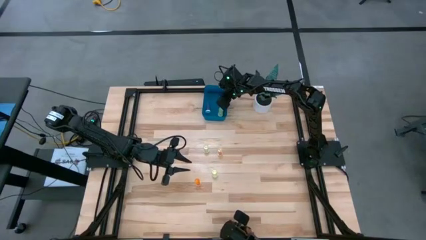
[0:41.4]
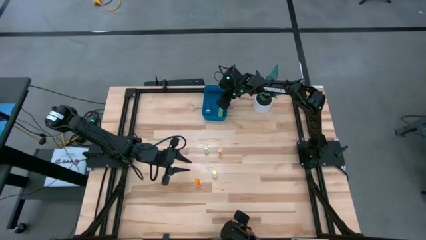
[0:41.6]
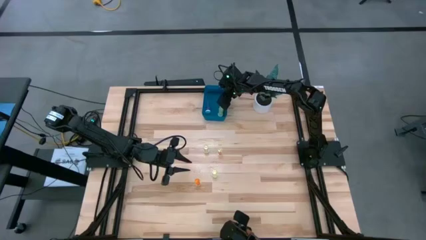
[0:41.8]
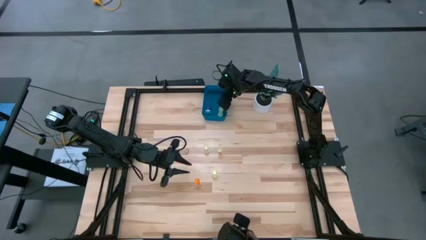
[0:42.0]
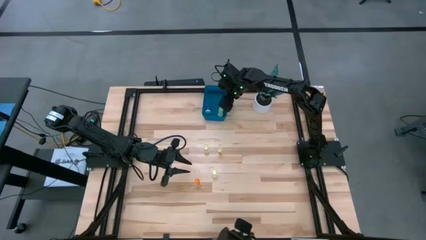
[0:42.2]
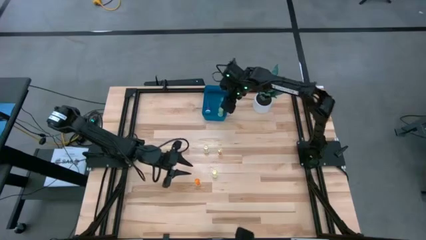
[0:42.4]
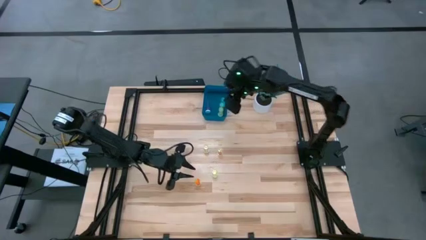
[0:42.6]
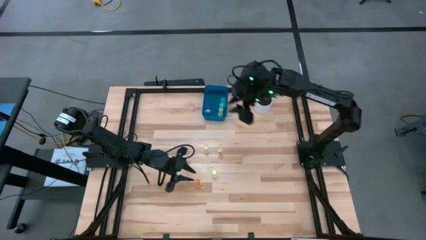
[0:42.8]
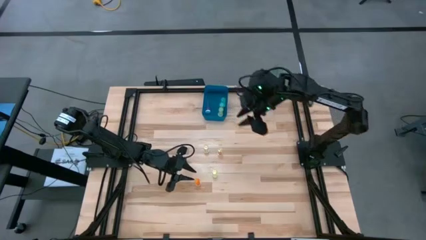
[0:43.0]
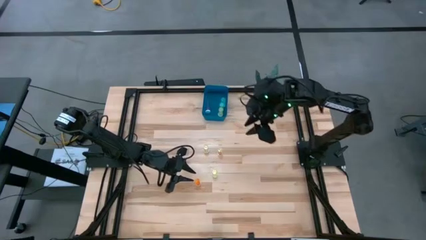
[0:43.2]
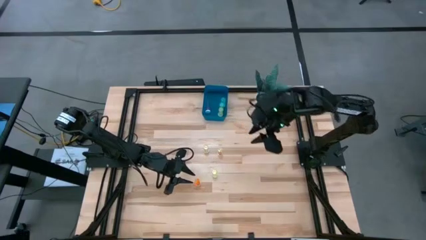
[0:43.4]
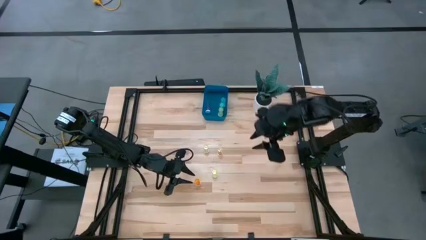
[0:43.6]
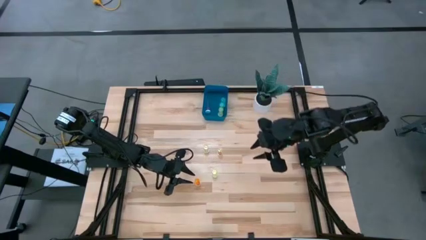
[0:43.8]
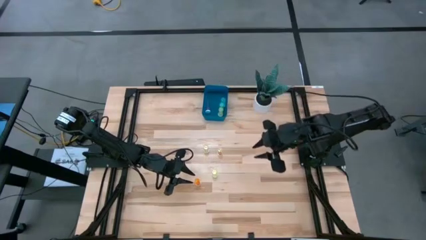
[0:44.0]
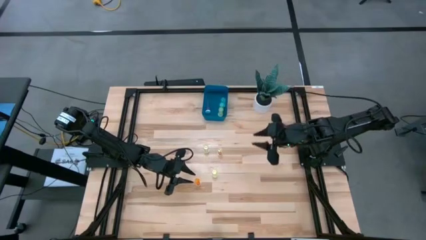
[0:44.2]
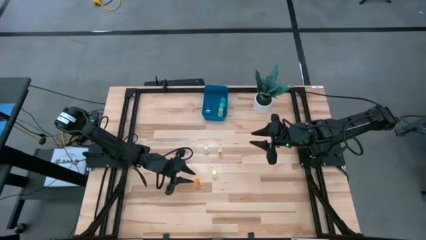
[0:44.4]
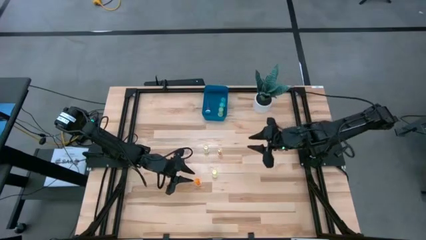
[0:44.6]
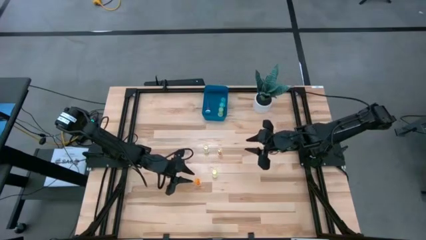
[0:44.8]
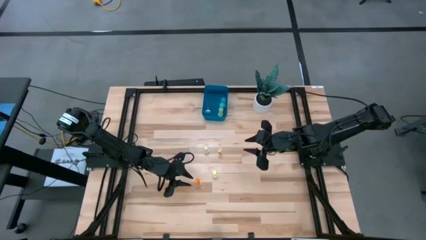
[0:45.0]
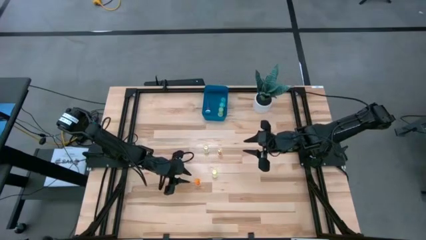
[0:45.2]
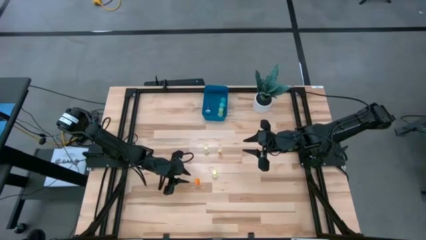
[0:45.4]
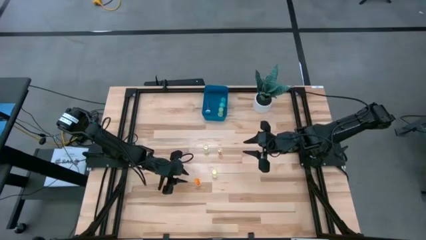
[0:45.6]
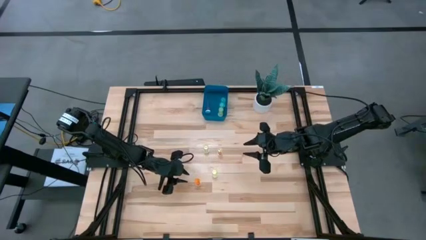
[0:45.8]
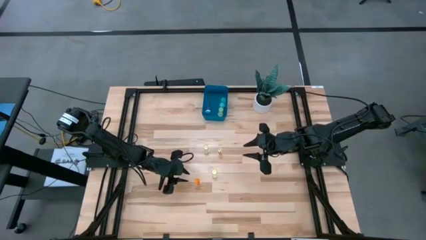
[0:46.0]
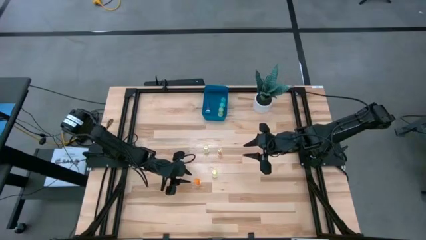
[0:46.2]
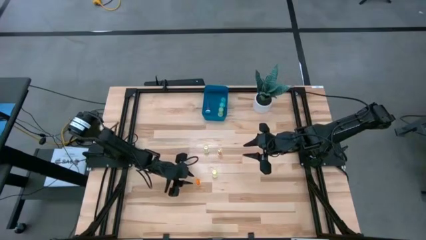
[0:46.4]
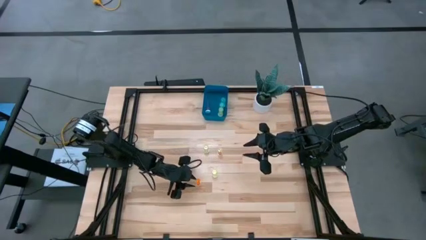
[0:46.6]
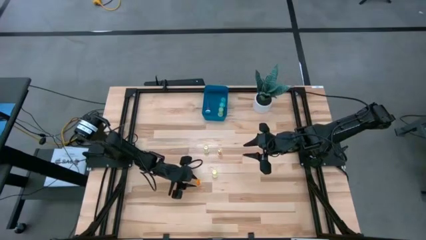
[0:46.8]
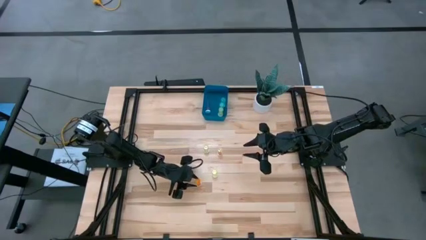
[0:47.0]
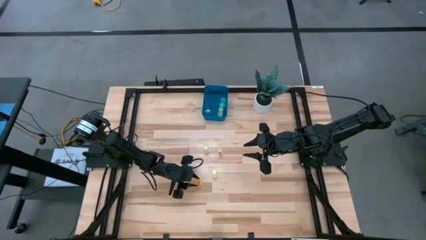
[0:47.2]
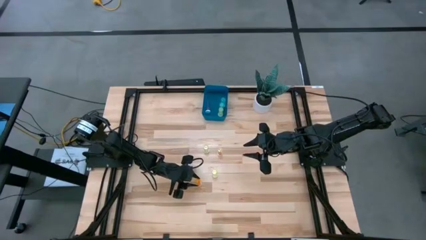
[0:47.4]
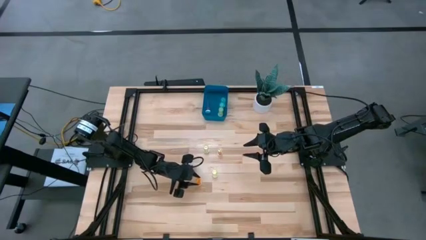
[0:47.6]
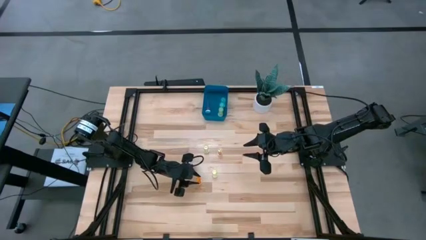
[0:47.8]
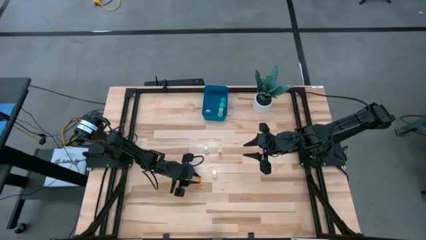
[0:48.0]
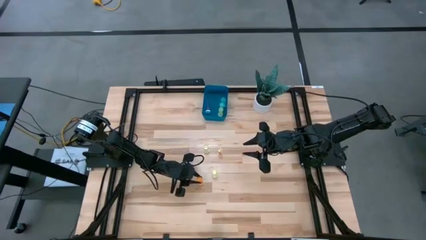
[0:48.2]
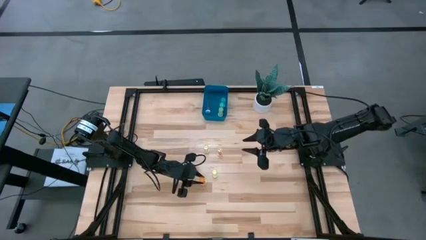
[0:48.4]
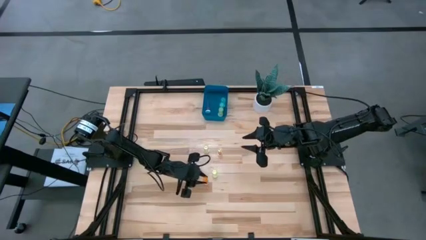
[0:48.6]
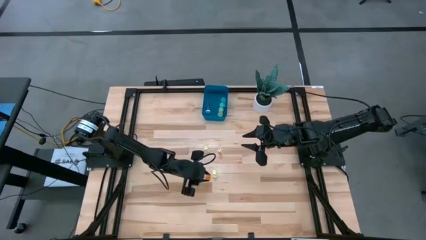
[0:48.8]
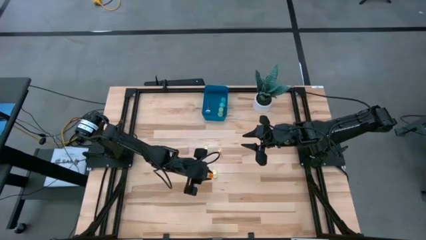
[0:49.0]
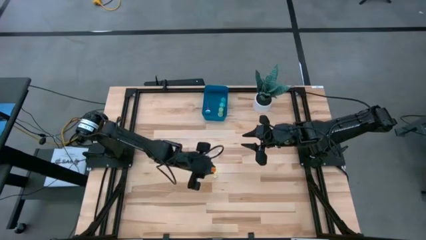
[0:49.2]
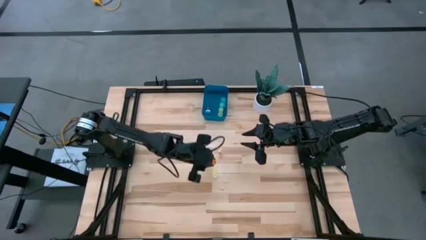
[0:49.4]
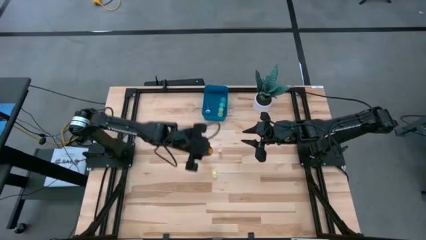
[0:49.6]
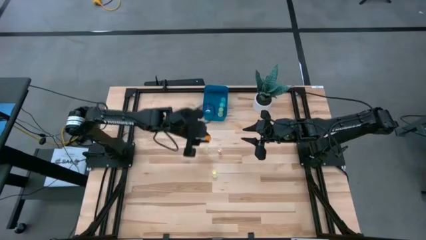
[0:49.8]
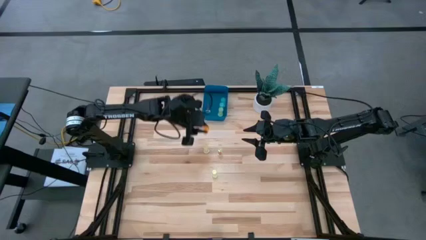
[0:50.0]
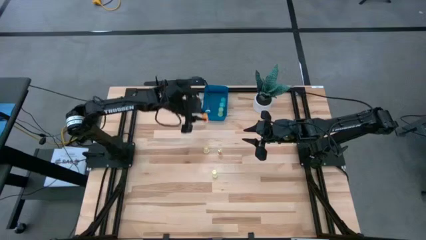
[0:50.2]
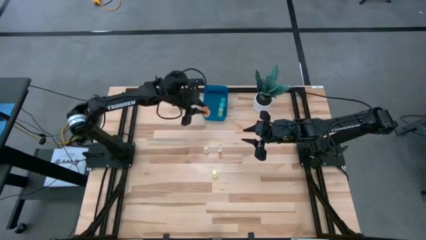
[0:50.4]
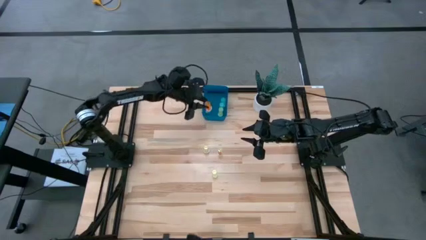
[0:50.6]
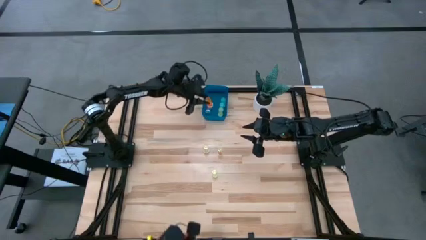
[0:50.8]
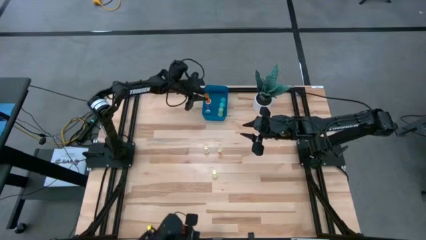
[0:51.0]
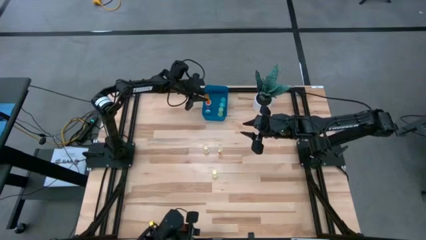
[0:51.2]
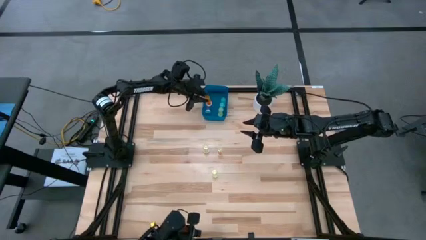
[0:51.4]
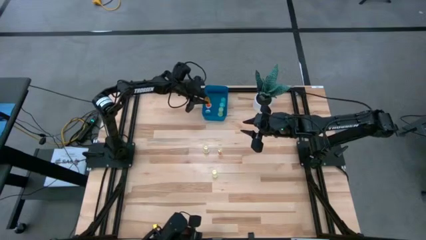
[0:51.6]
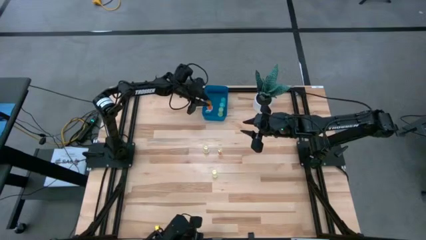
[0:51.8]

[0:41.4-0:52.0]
Task: Pick and place pill bottles into a basket
Put the orange pill bottle into the blue container
